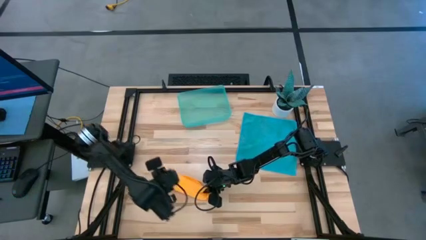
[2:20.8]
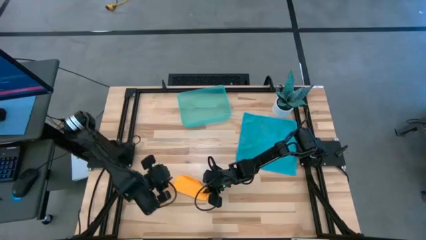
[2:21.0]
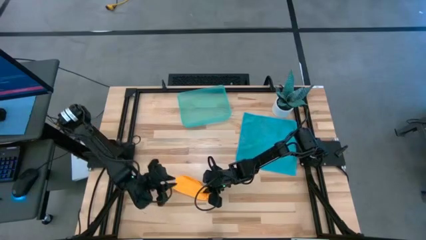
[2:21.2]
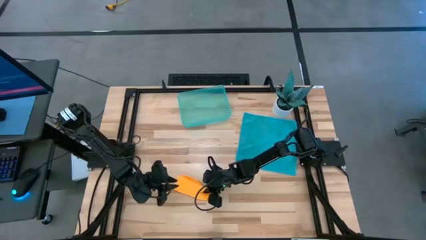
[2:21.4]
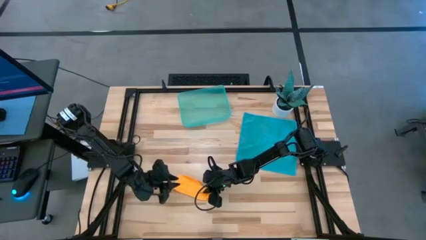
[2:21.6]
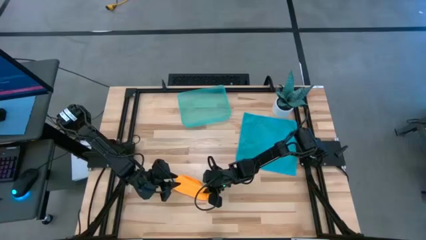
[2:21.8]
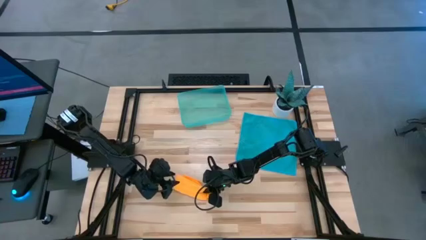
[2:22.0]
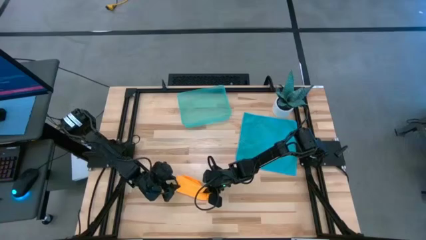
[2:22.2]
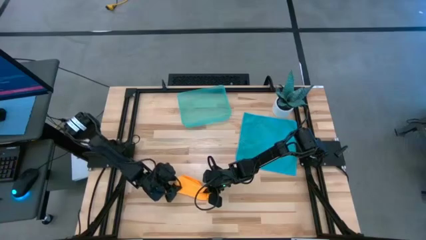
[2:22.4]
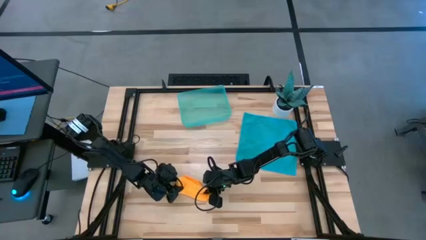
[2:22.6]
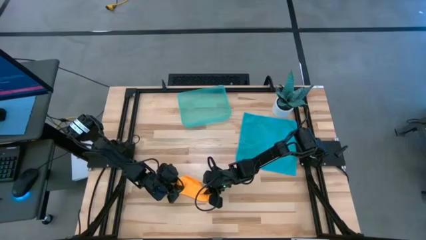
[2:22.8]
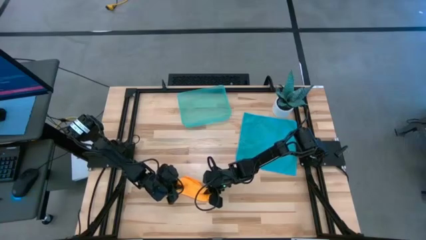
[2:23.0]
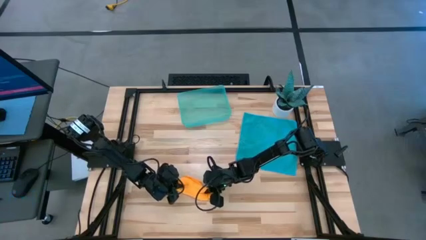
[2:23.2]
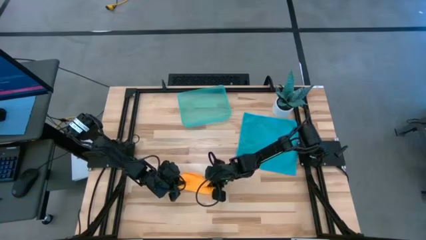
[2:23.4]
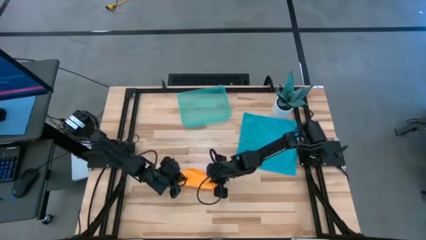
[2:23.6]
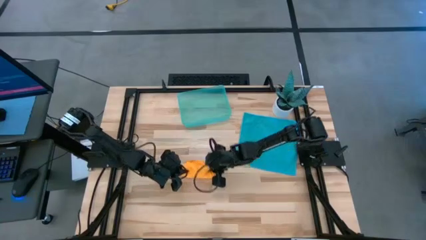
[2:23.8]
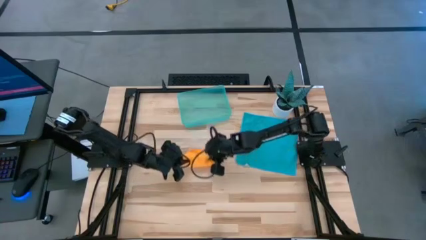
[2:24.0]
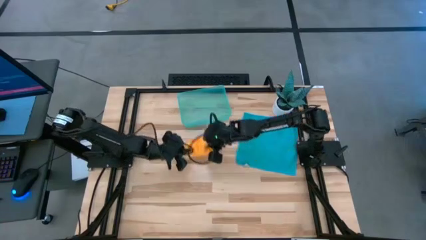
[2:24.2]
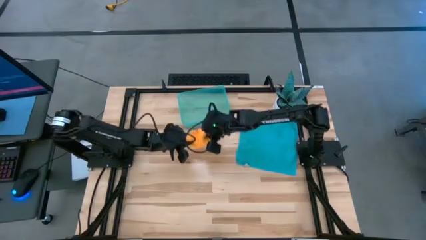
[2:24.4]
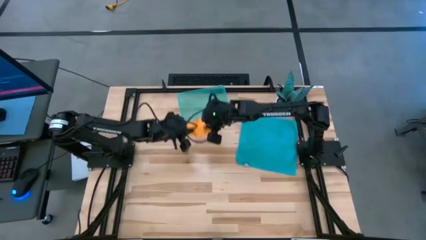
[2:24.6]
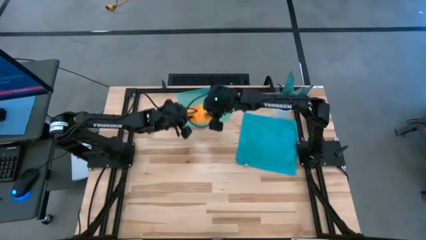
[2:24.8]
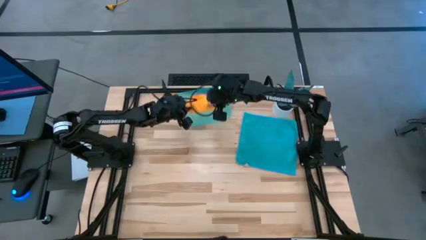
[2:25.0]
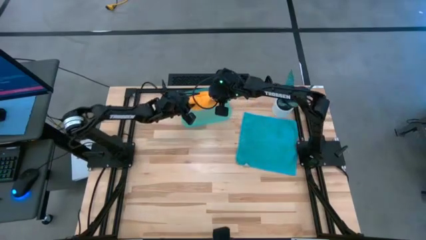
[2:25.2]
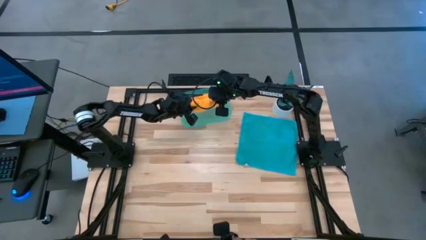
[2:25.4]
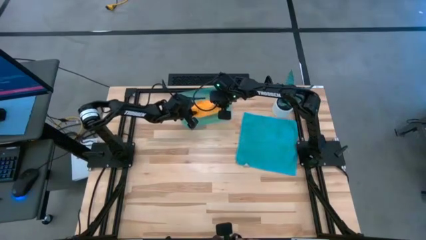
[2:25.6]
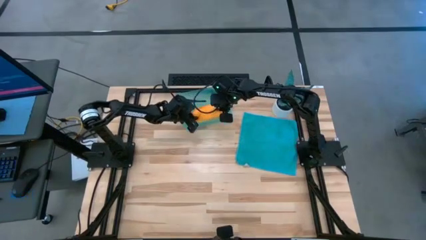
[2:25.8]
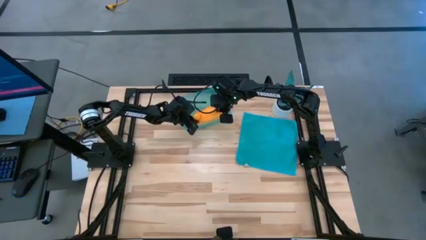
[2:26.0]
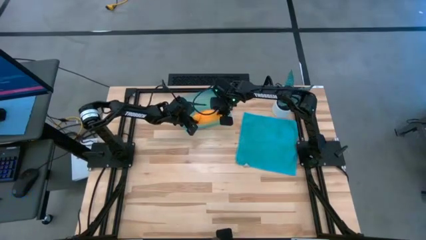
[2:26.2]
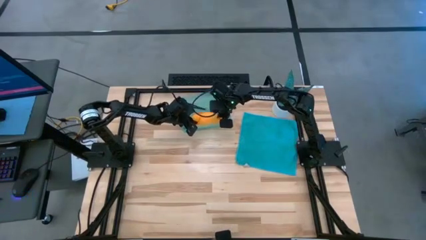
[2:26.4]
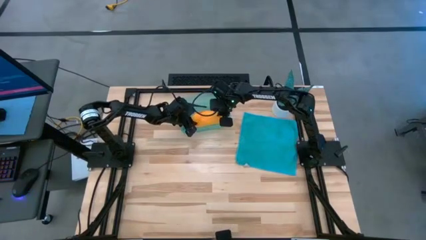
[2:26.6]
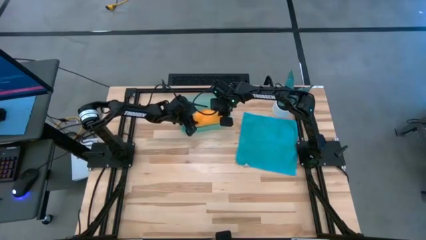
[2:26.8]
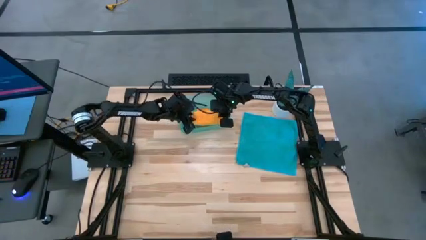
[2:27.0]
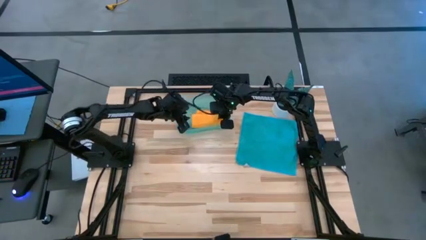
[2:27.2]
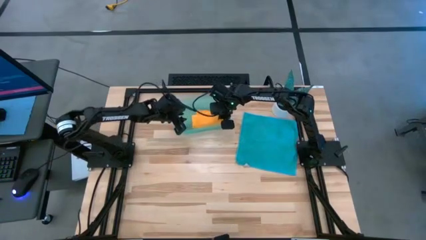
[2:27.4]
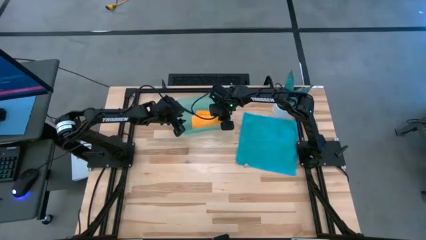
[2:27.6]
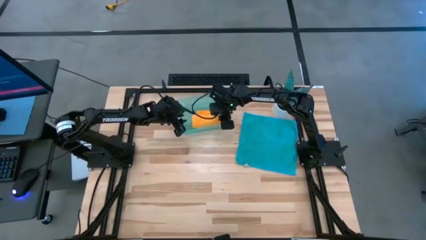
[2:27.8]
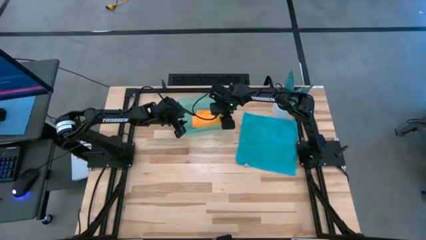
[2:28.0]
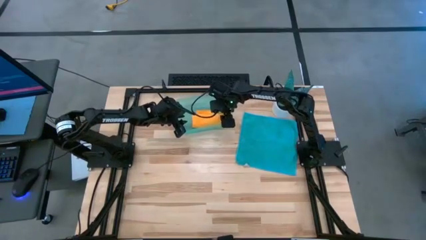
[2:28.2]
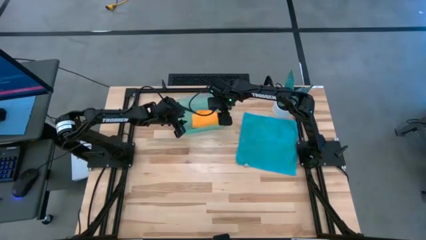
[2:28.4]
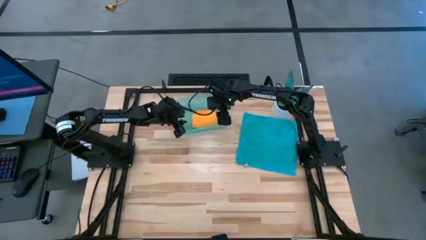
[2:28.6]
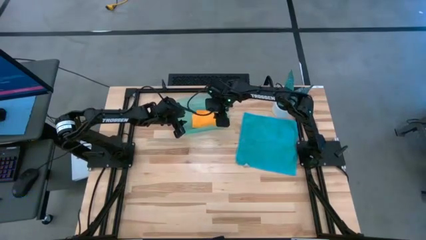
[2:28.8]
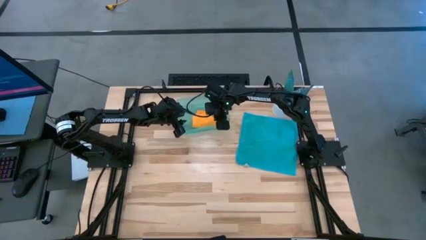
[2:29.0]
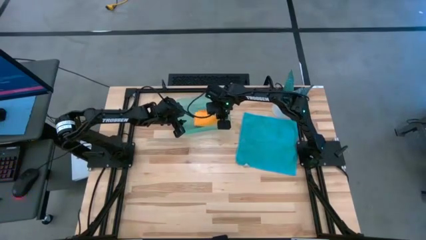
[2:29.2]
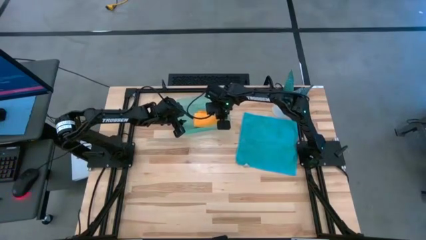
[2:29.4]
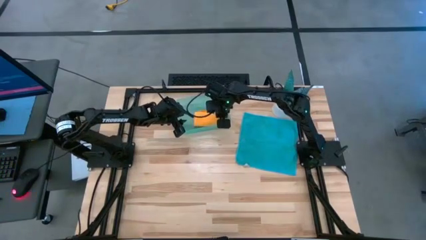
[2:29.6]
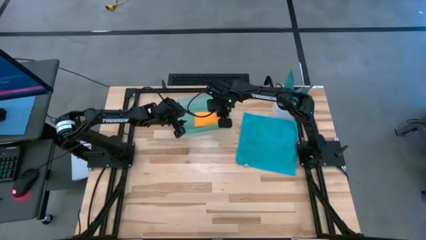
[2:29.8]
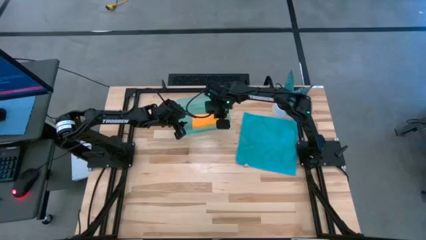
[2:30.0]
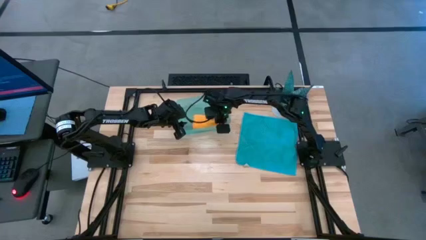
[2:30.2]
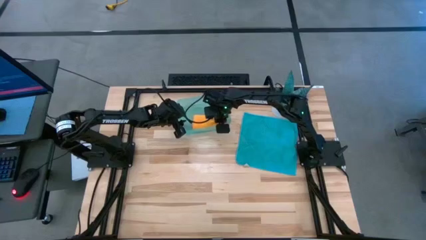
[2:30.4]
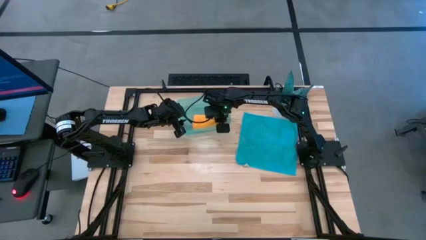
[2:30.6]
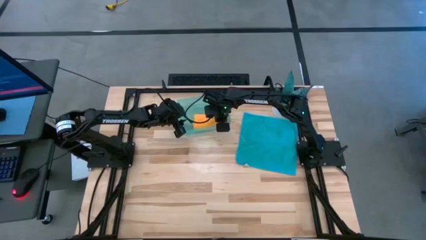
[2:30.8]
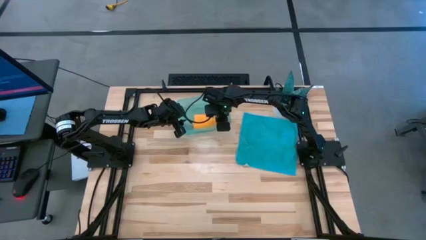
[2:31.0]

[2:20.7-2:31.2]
Task: Roll microfiber towels into tight, uniform cylinder then place into a basket
Put the yellow towel into the blue bin

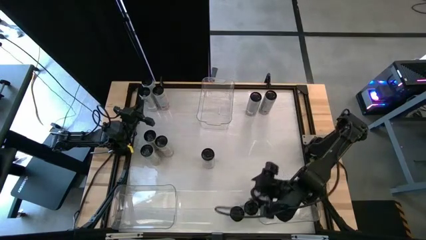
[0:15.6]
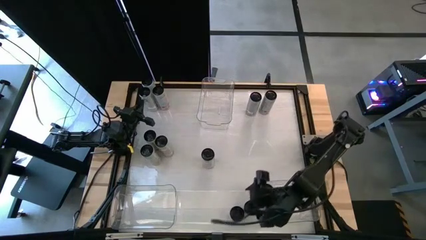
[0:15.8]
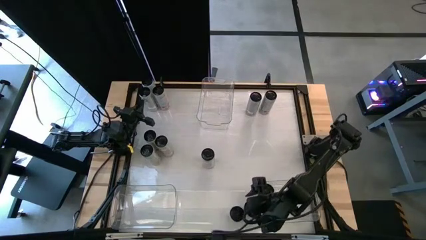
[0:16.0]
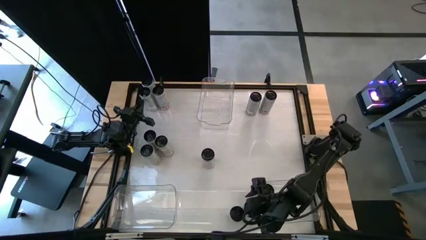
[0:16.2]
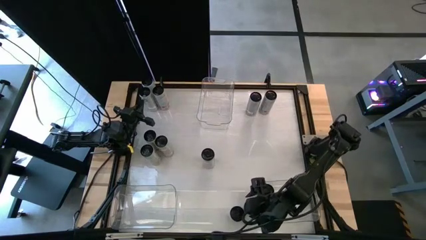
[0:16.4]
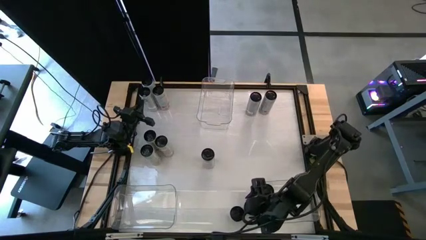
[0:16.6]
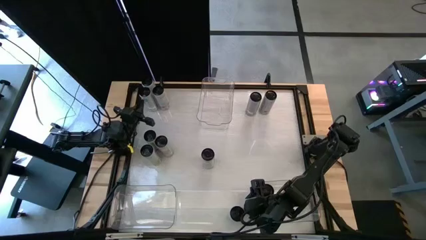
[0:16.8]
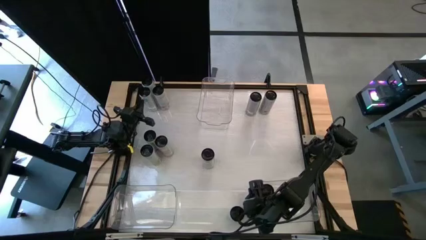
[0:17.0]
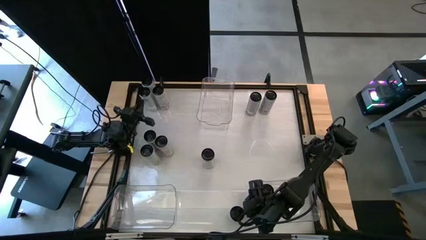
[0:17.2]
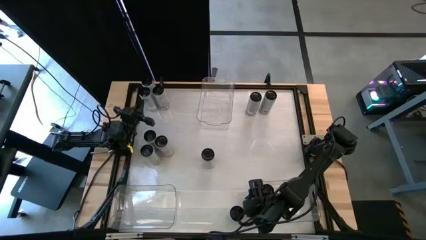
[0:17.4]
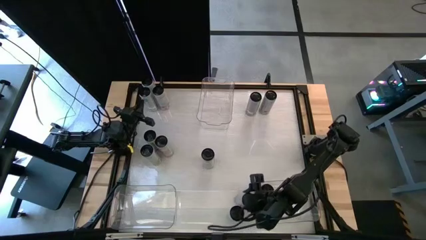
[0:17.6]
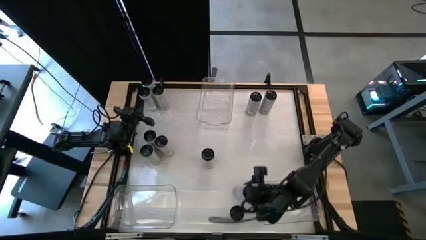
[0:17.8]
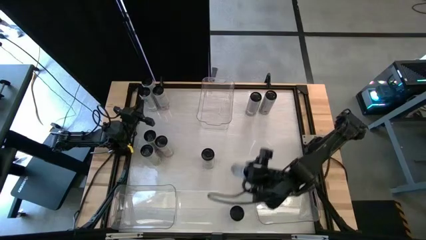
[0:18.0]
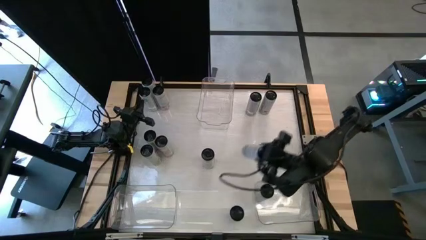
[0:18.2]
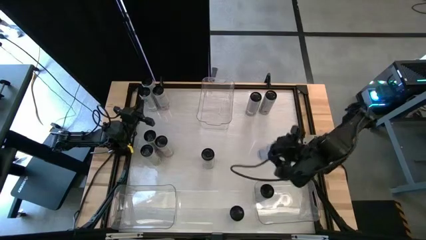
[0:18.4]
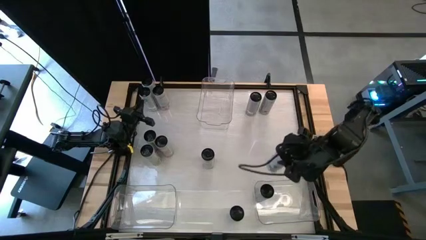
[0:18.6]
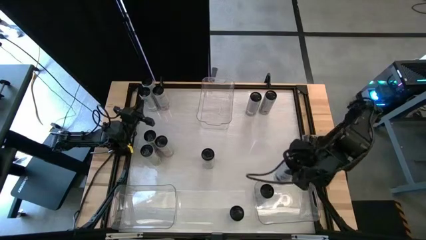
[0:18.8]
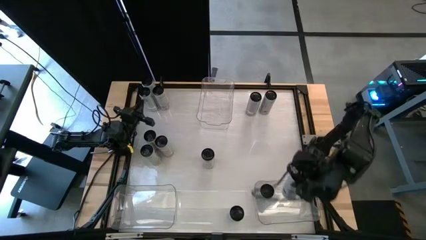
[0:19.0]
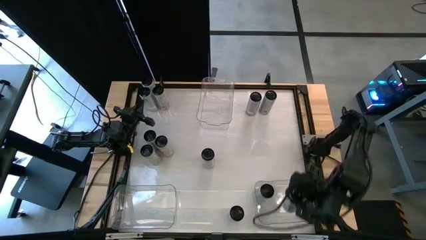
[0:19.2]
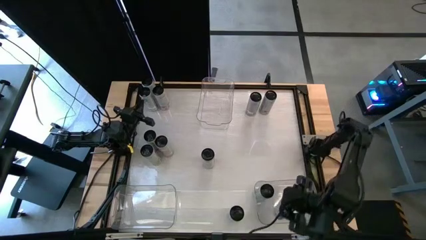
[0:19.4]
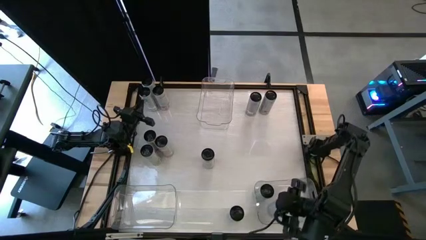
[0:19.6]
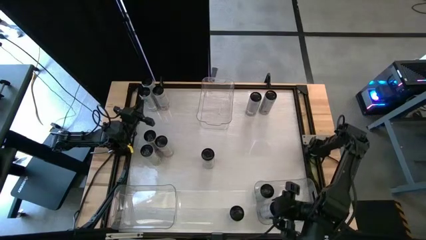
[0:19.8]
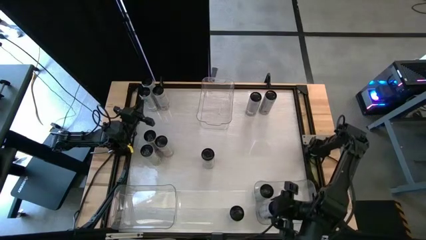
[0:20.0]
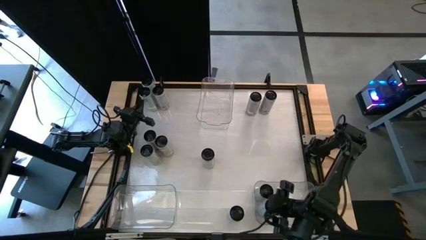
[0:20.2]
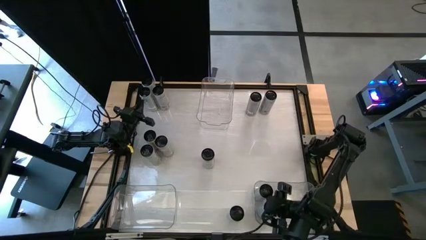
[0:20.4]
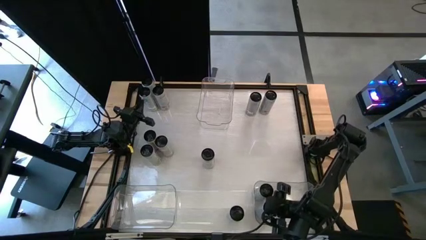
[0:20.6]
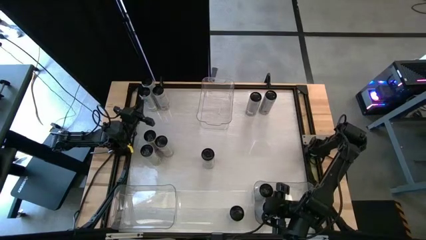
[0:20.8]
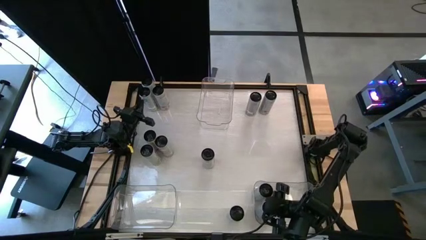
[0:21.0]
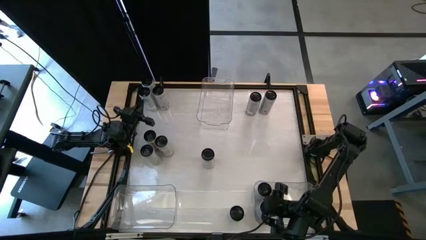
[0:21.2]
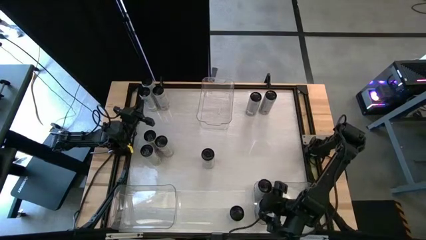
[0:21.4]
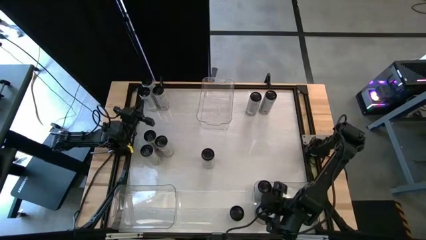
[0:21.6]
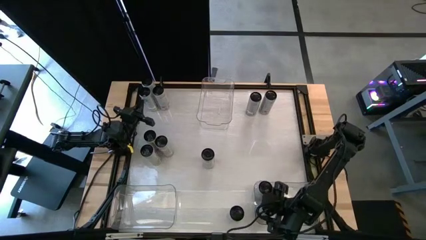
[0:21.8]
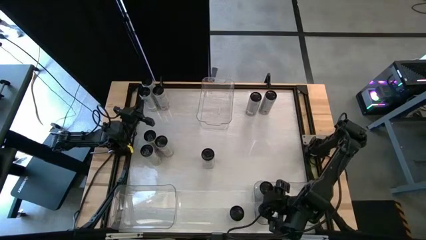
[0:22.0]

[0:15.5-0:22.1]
Task: Sort soda cans
Put the bottom right white blue soda can into the bottom right transparent bin
